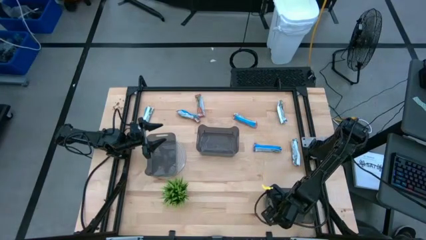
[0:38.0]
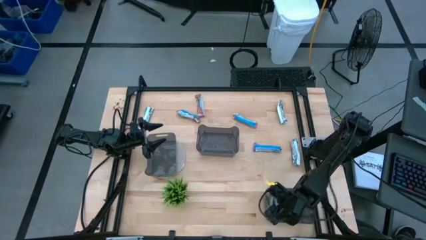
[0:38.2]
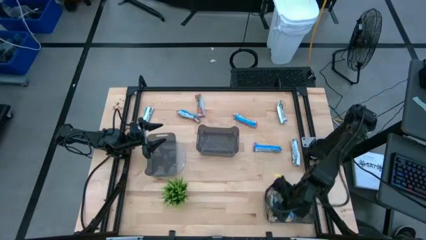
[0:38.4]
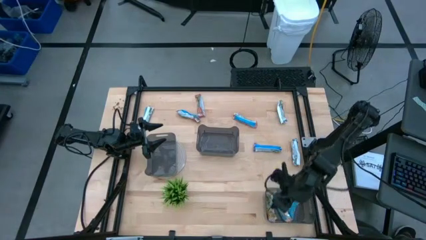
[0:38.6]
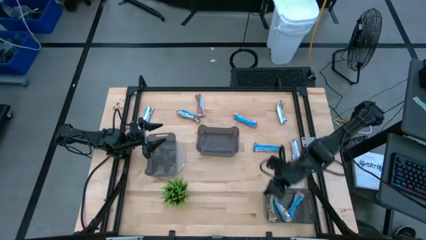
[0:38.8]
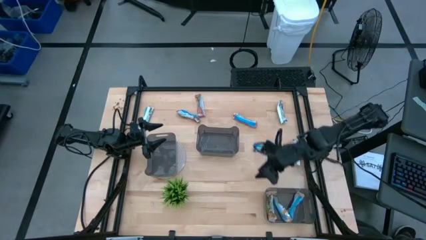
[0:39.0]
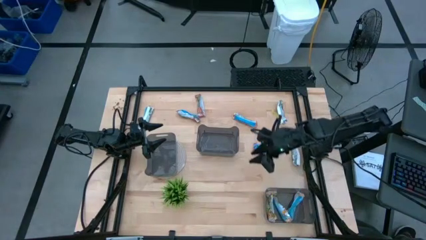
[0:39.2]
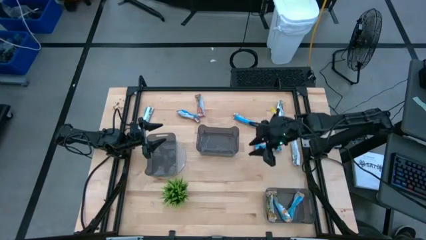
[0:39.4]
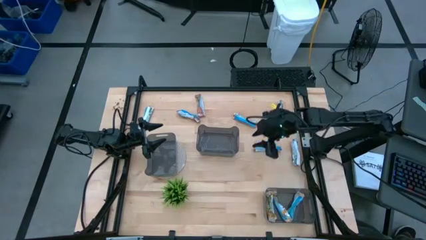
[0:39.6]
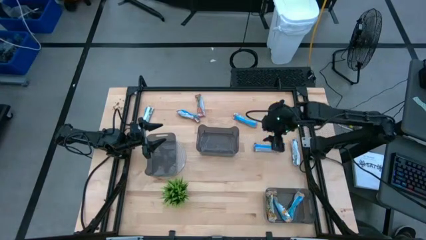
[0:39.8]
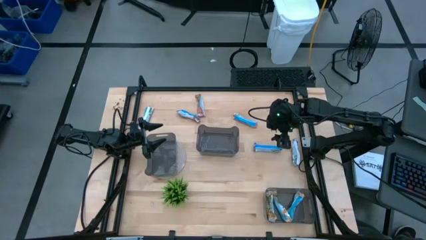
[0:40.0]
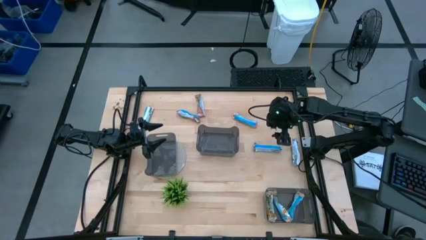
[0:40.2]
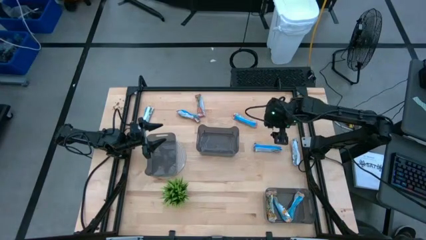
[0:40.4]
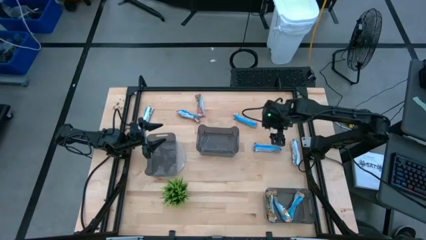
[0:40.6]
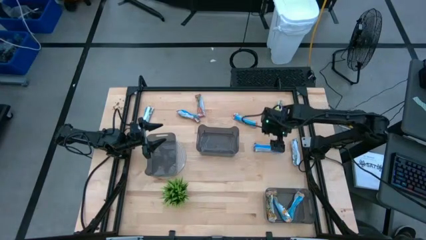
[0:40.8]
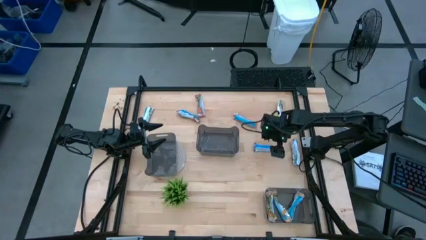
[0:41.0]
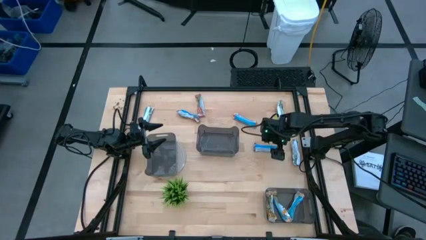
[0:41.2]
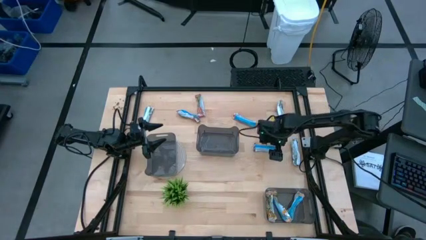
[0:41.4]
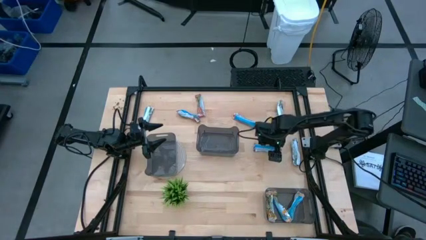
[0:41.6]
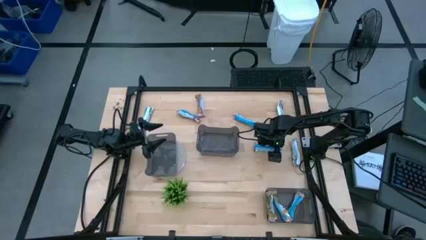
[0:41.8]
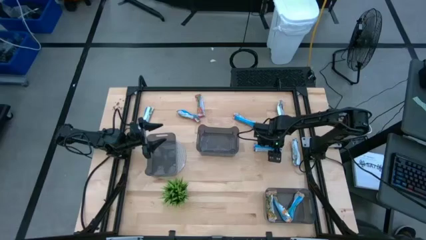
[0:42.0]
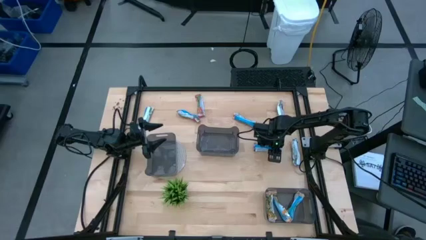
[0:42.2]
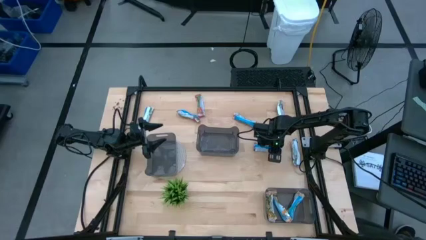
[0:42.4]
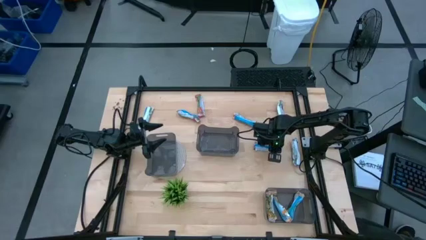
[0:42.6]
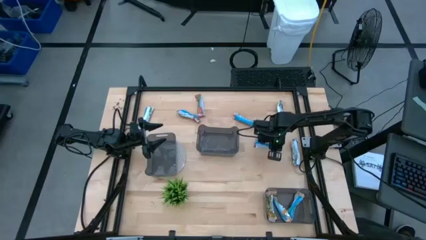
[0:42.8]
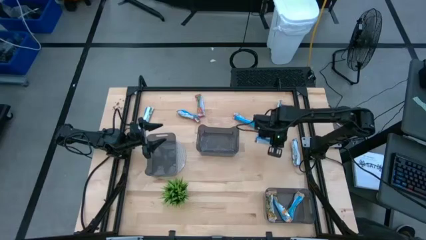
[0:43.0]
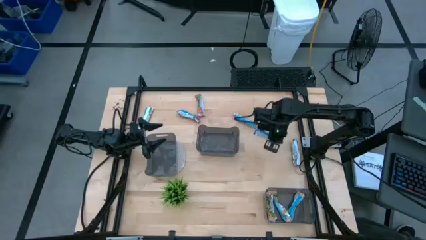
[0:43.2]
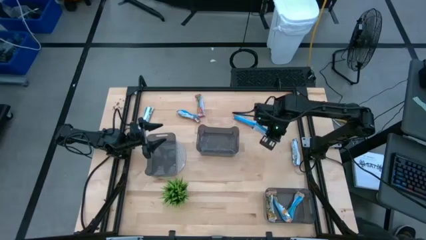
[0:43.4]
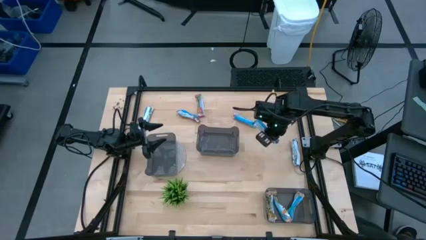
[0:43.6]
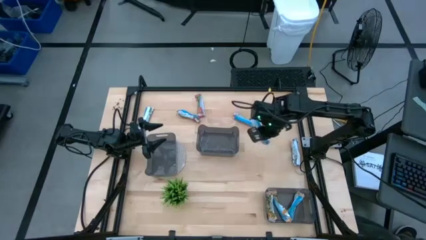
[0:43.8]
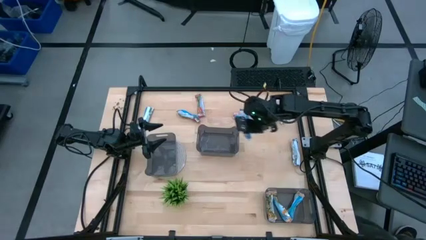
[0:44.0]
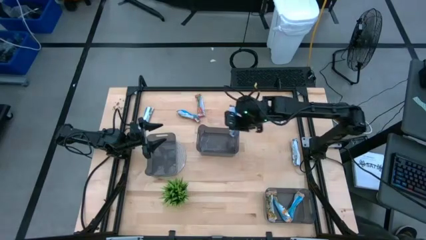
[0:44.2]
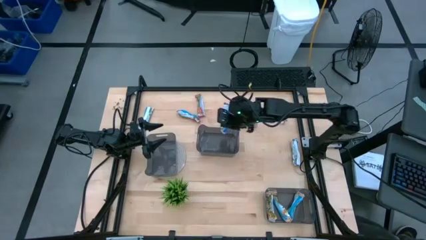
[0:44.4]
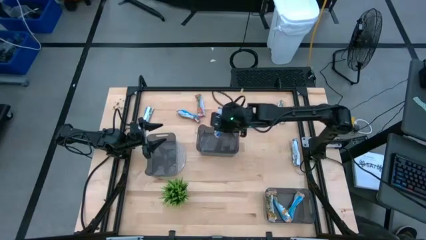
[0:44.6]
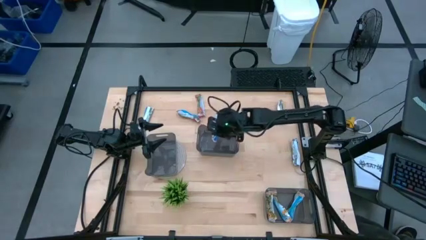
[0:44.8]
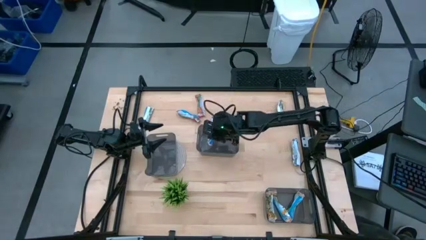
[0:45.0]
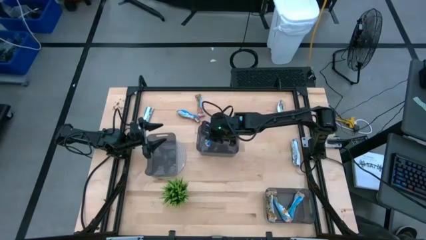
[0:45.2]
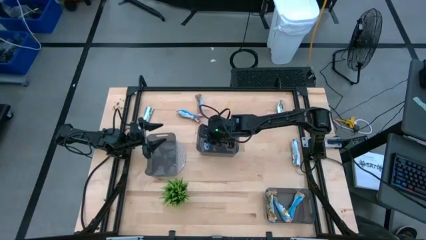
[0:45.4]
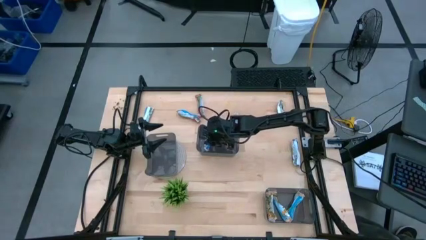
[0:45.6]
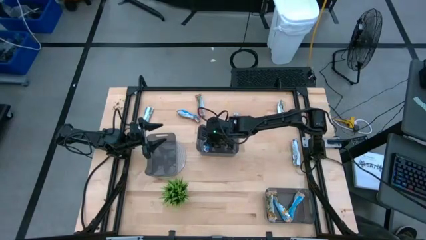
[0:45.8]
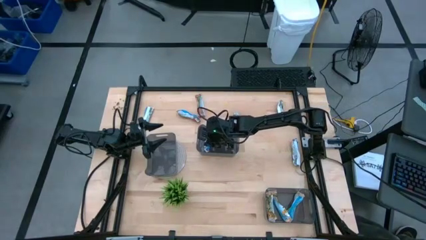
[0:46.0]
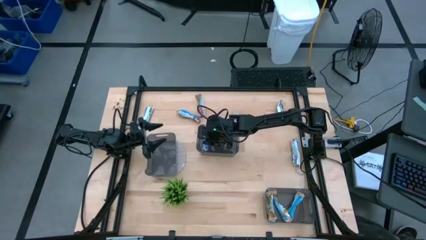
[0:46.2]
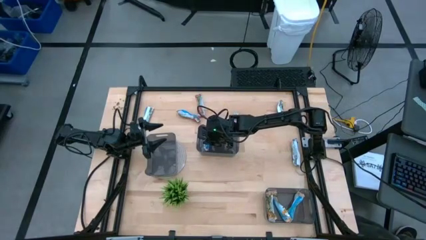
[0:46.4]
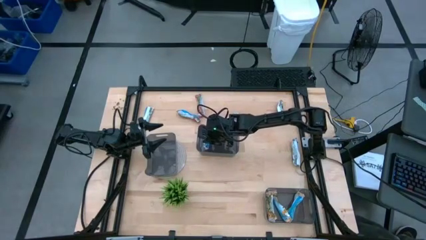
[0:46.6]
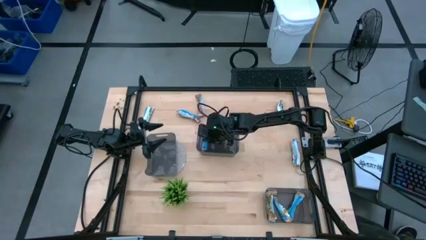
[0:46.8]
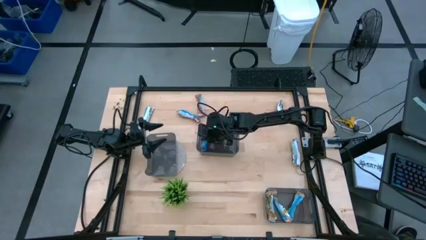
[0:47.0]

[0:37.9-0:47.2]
Task: Pick and place Granola Bars by type
Put the blue granola bar into the top black bin

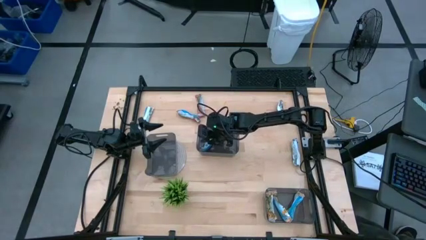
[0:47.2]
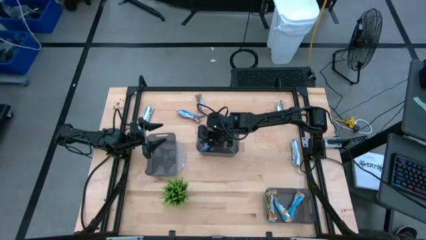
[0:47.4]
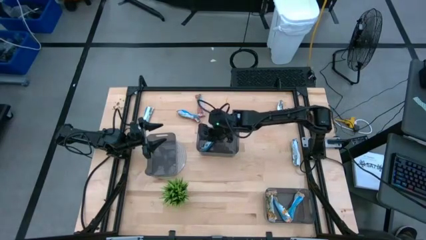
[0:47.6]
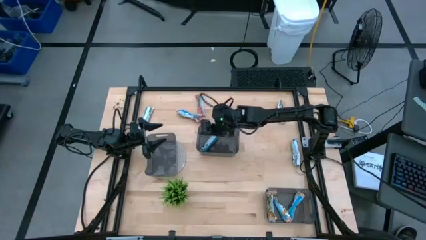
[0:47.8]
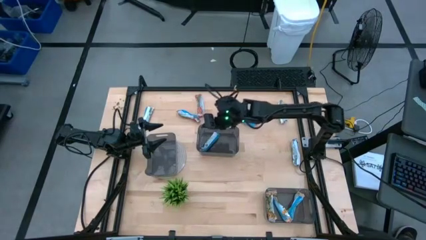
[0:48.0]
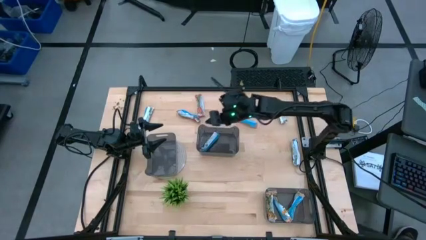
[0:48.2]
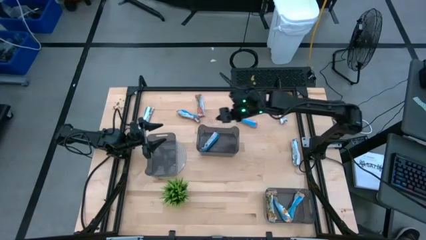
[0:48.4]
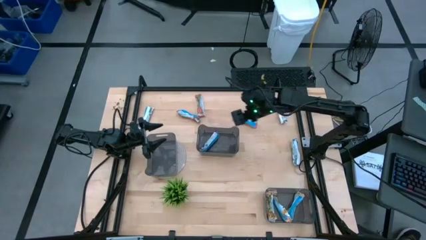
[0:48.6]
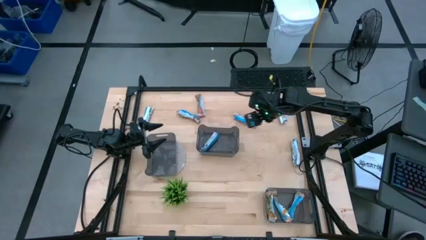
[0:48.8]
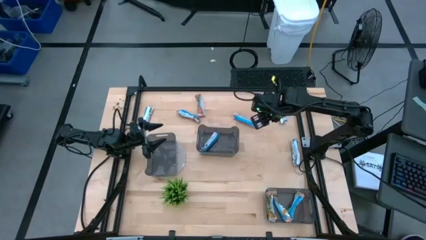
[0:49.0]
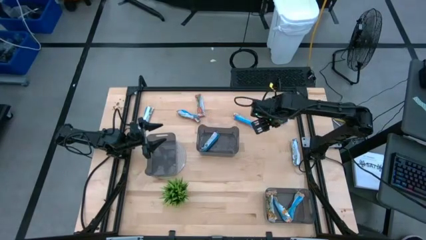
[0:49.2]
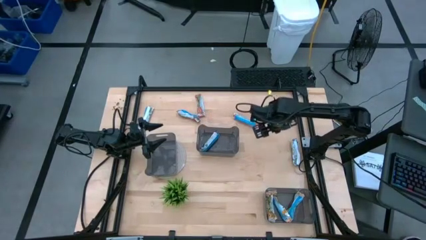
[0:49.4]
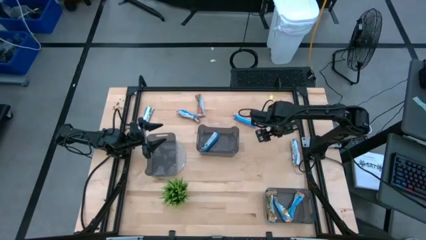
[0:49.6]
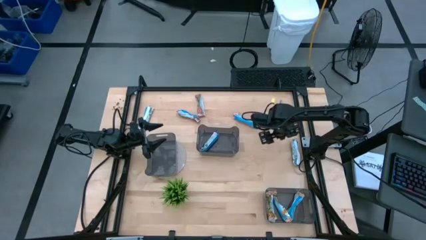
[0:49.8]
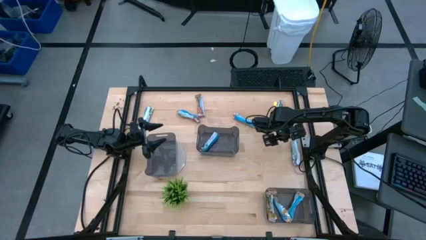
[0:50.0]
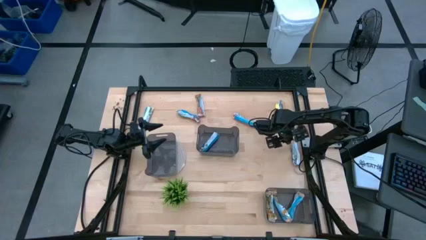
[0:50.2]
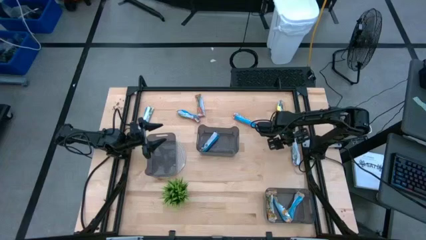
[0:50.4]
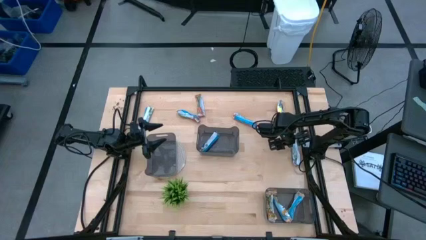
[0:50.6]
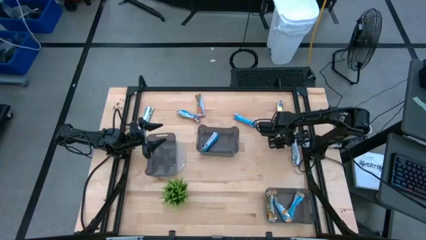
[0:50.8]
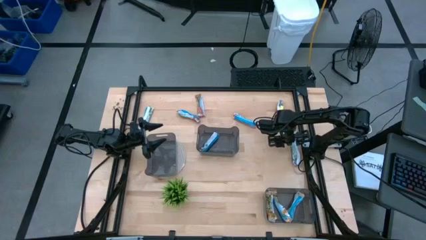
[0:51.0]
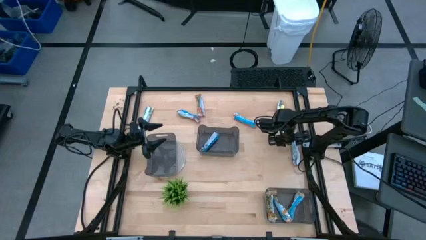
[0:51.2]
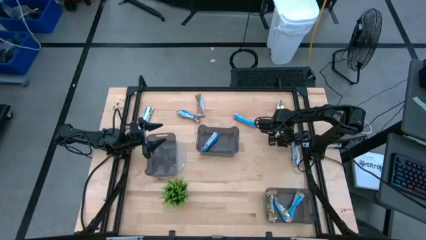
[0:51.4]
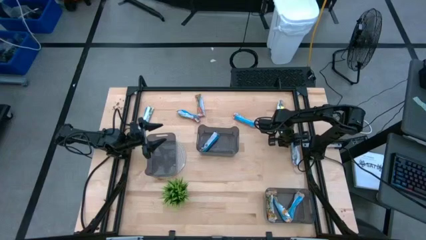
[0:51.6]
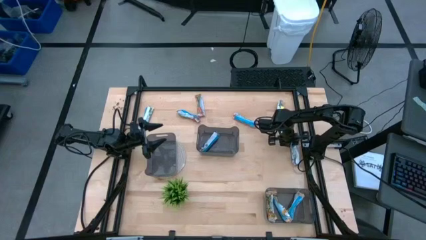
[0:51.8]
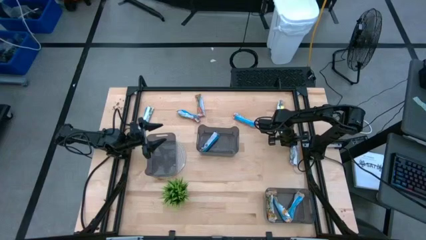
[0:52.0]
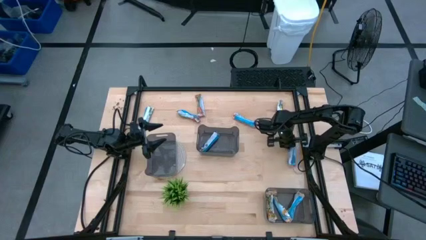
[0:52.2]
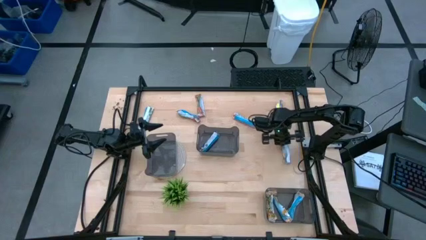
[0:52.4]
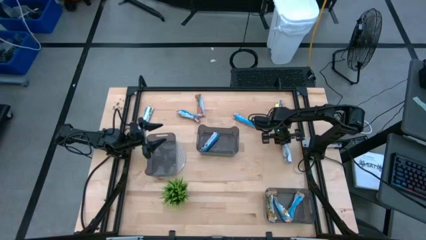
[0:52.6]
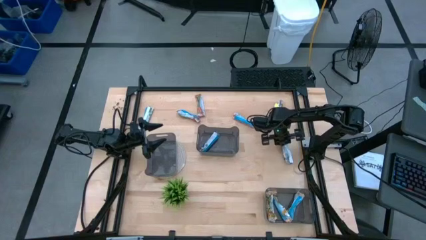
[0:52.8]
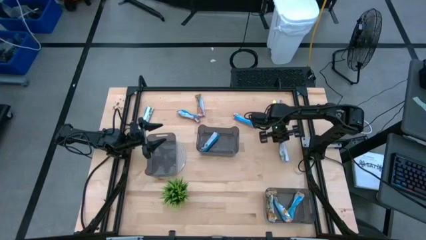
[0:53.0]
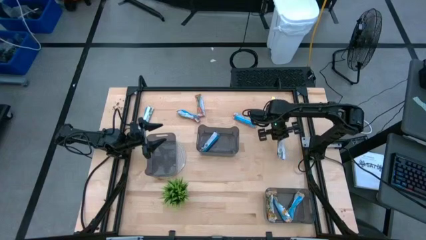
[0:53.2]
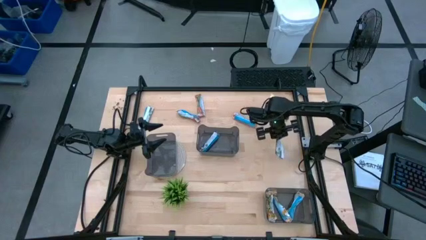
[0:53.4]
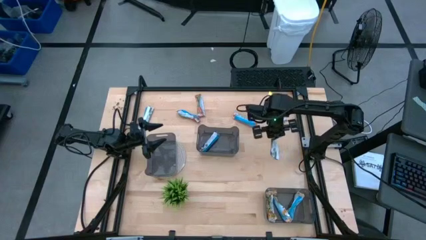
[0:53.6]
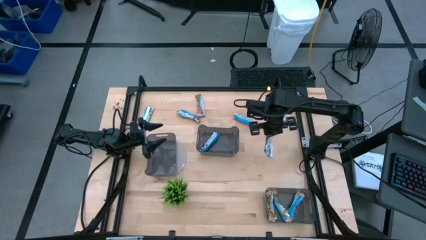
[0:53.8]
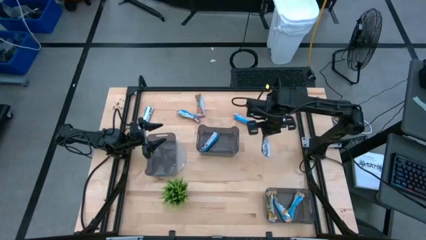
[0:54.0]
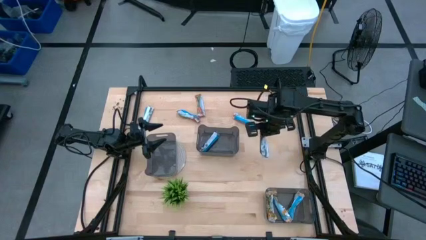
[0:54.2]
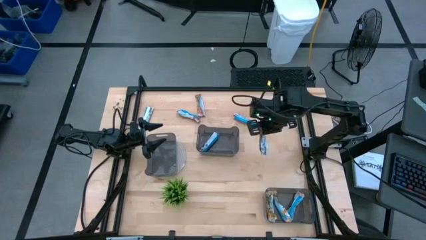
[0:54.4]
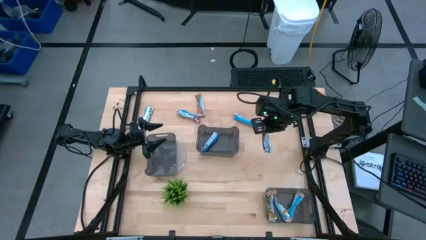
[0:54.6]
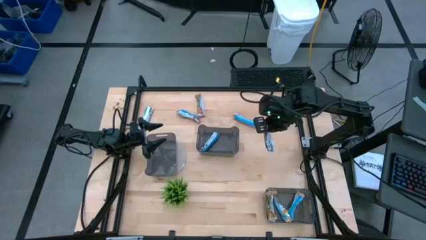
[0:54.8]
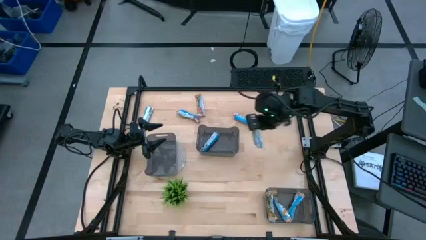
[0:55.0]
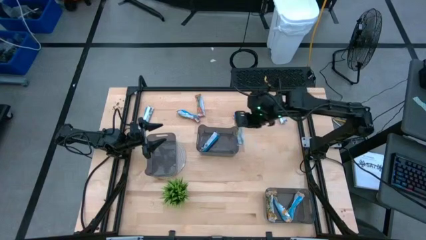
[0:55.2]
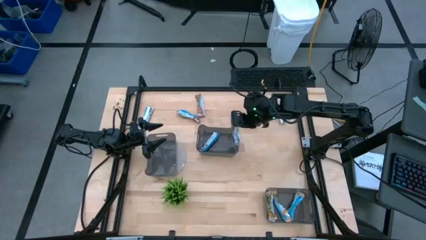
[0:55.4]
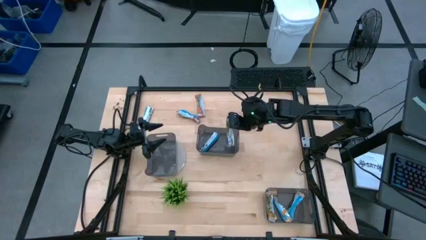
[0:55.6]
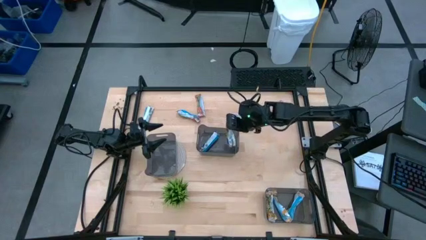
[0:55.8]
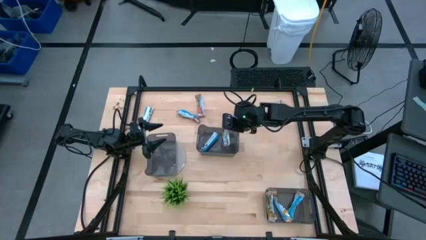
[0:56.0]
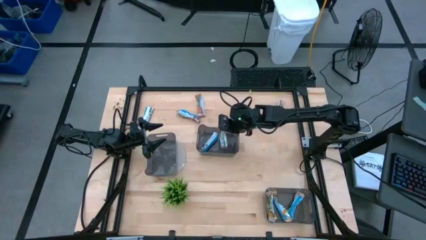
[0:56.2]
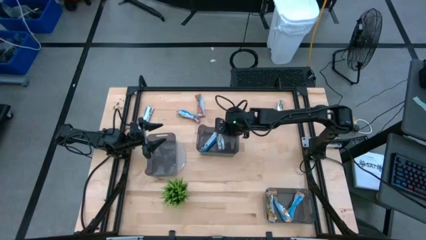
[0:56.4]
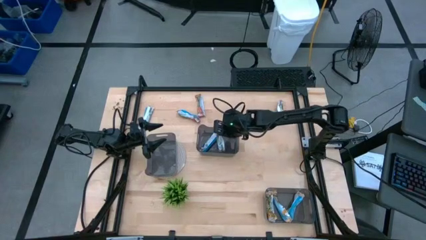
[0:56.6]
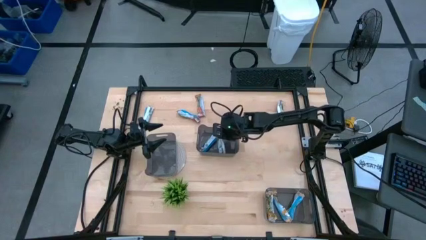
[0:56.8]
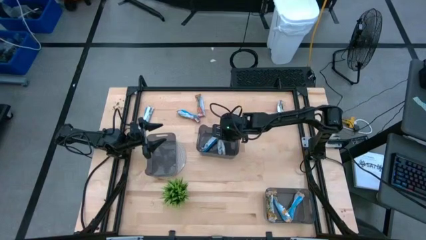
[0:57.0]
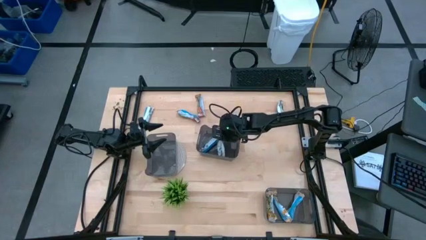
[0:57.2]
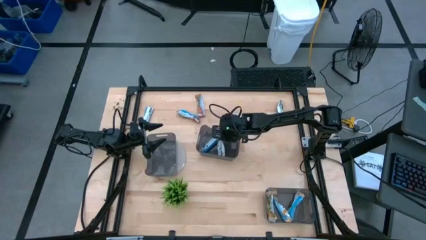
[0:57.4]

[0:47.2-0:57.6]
Put the blue granola bar into the top black bin
